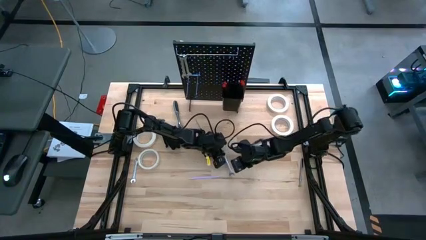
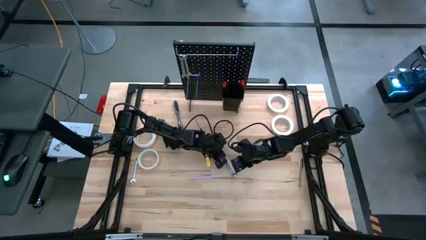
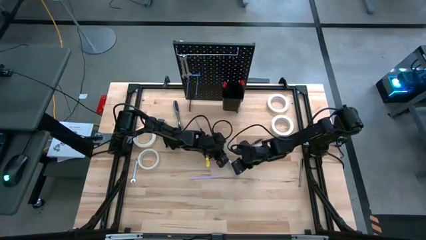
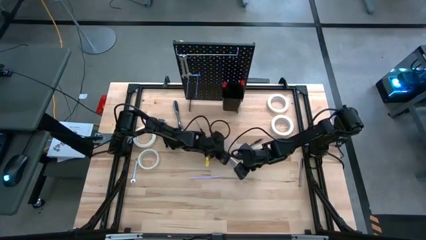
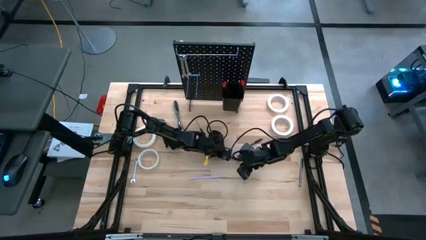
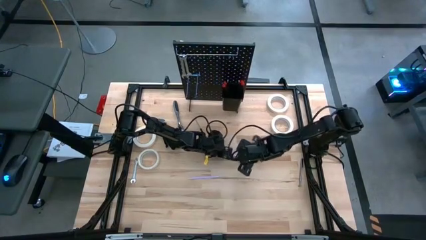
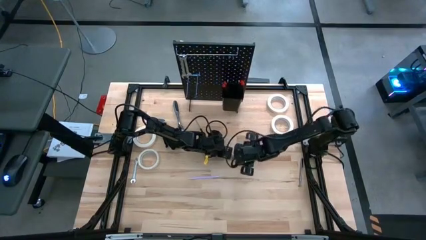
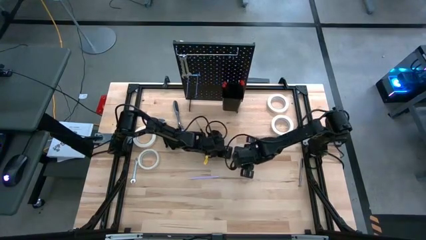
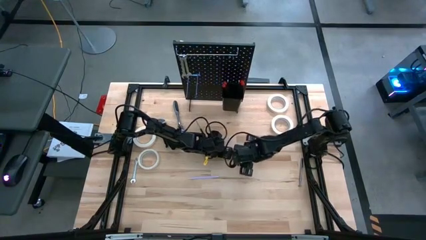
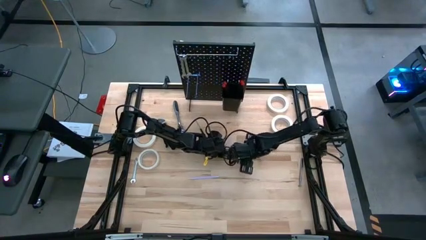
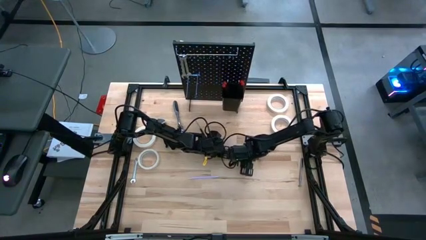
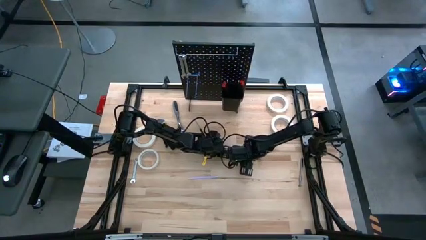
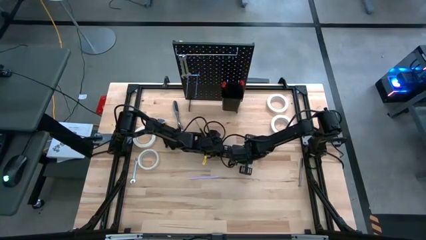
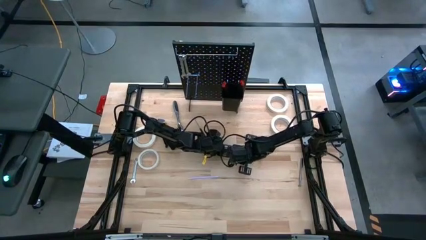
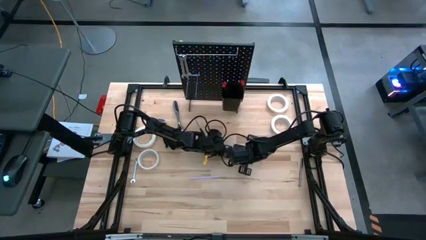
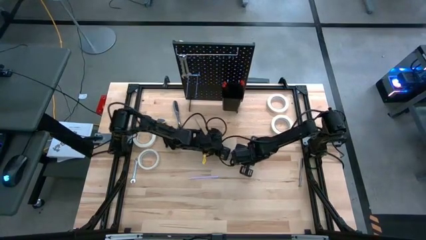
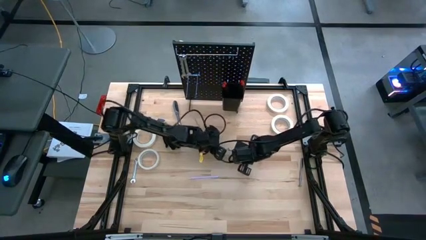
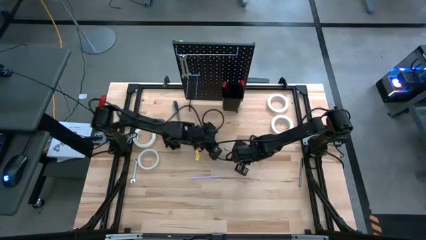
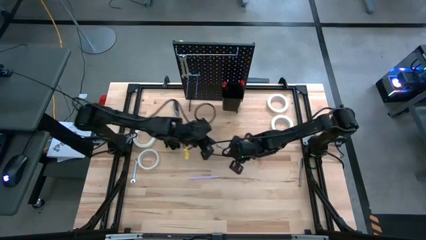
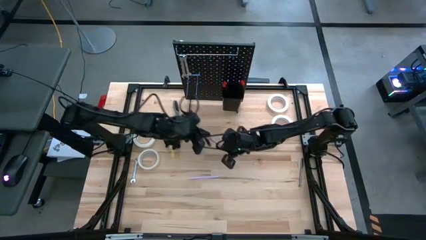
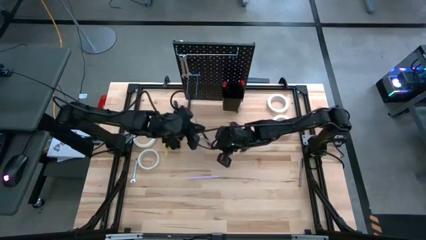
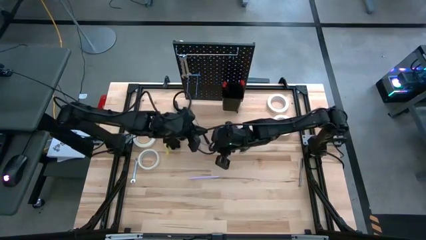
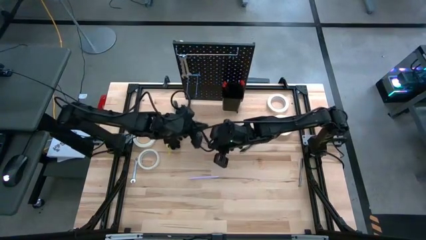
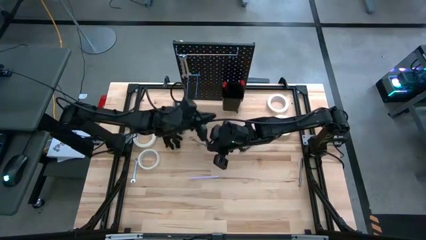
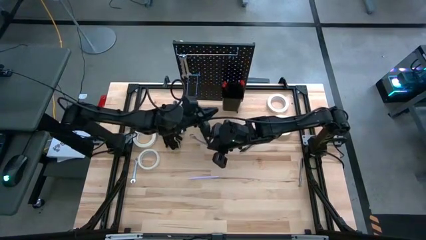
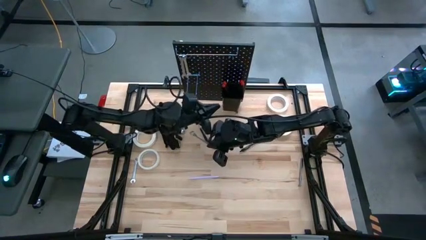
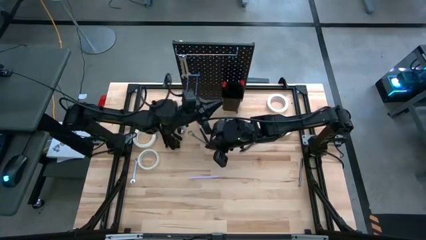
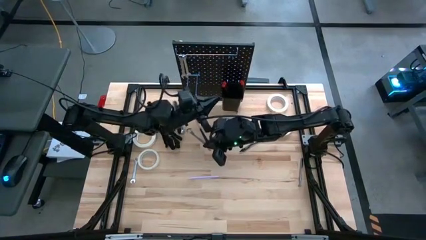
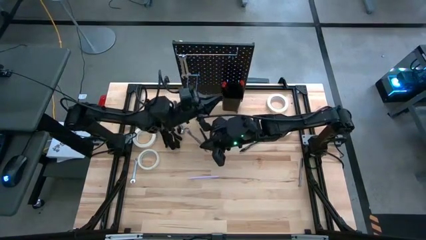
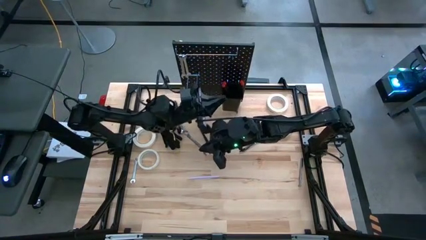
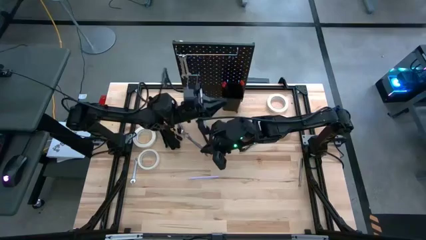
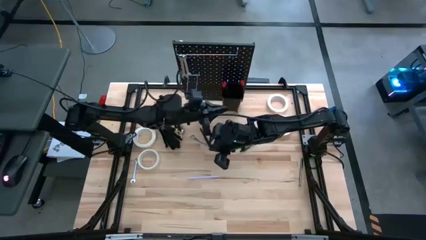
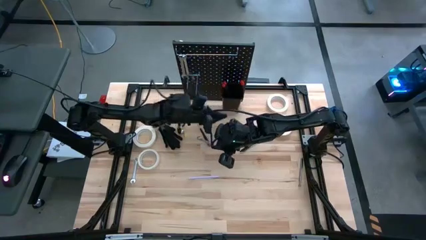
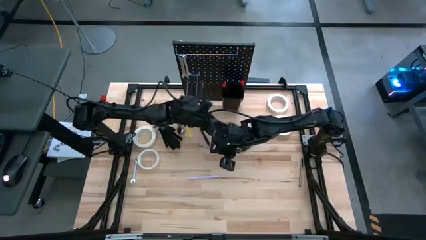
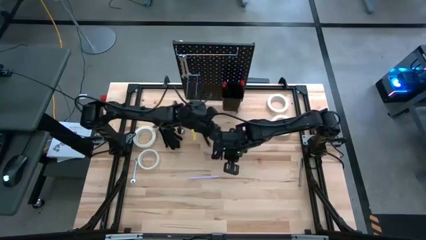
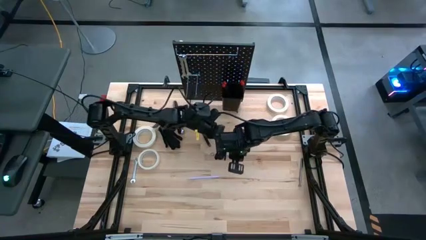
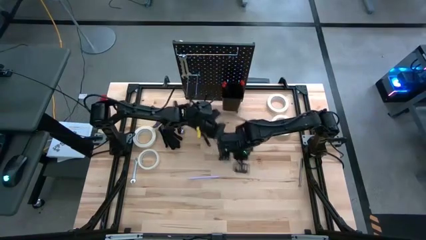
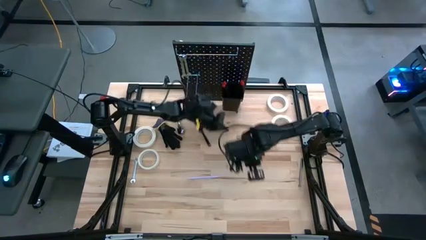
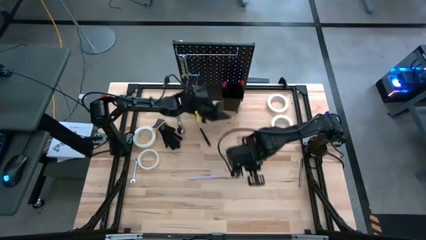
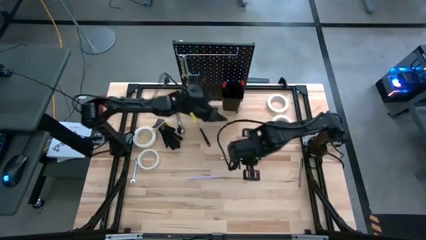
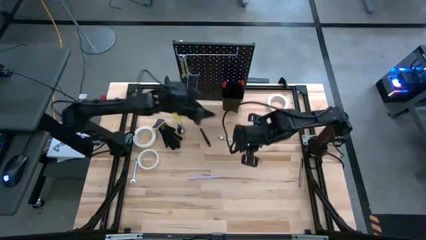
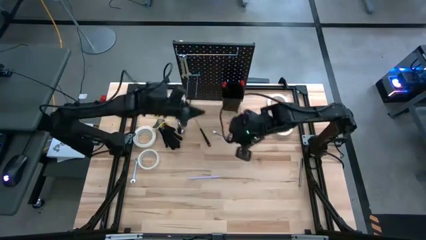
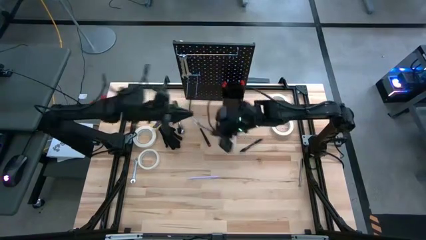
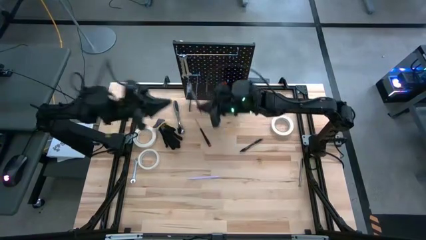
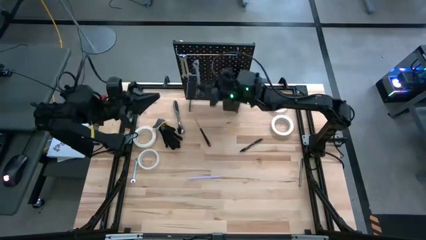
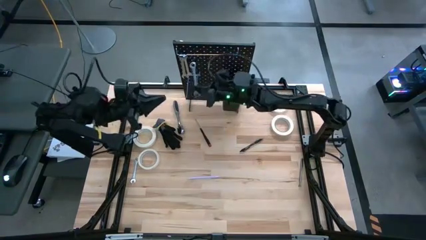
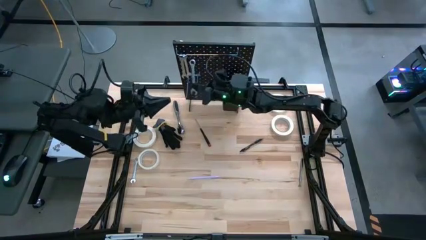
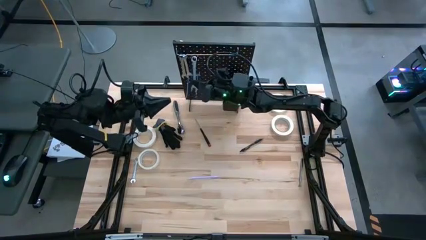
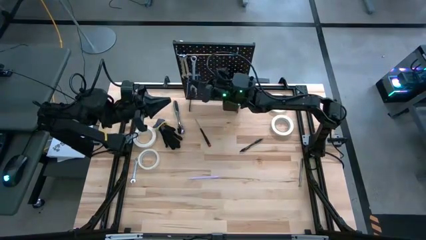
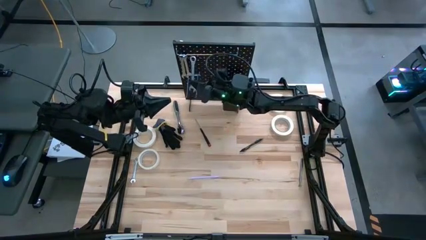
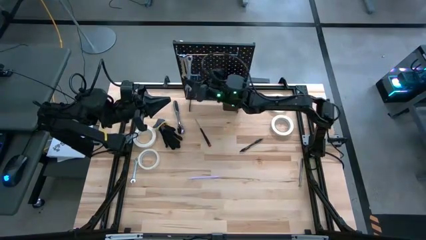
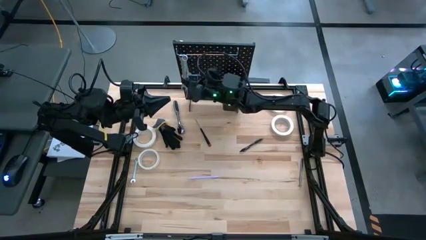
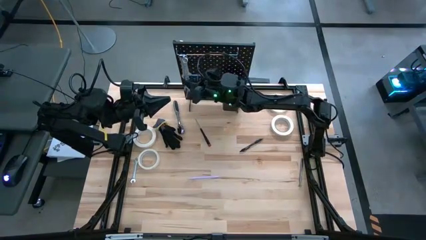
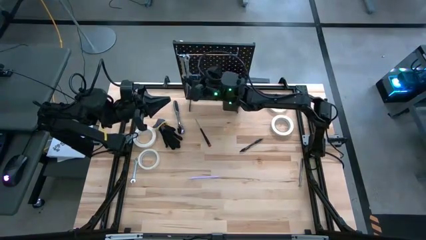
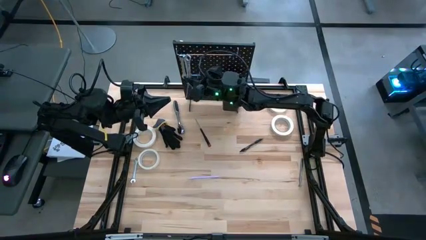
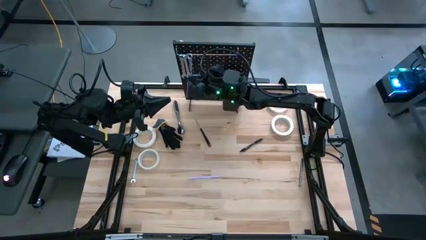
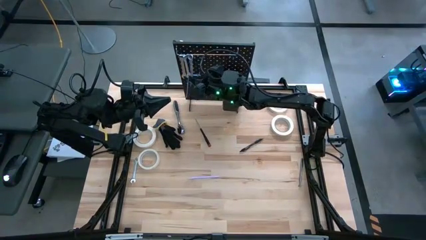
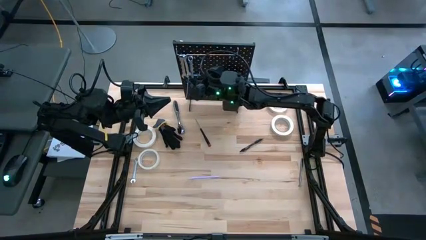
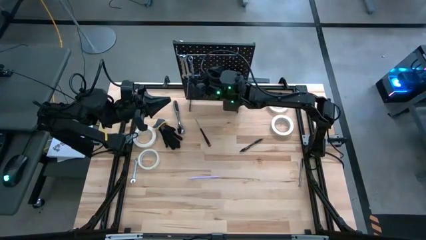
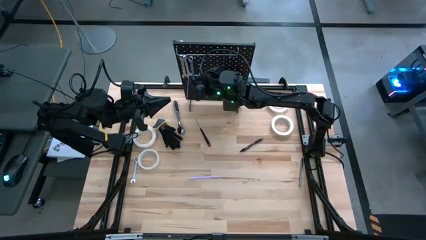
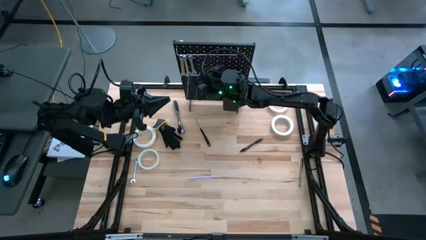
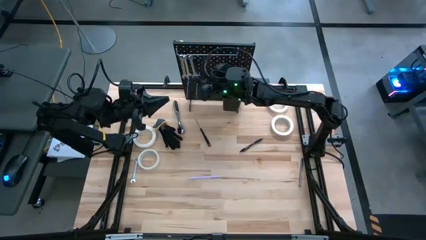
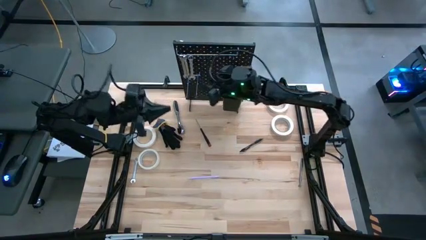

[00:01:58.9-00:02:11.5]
Task: Hang tools onto peg board
Hang the wrench onto the peg board

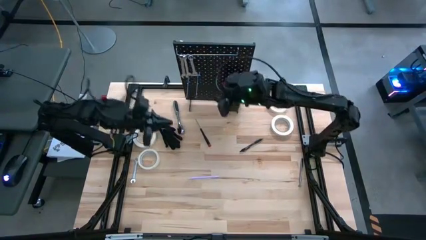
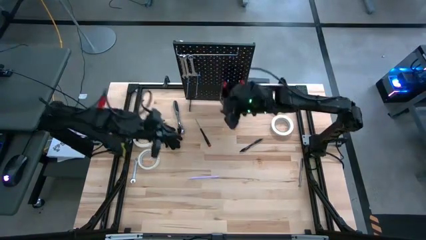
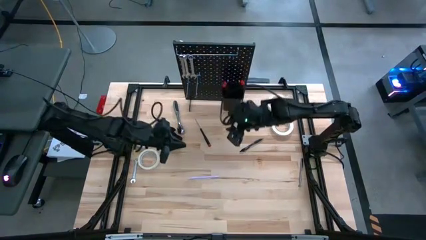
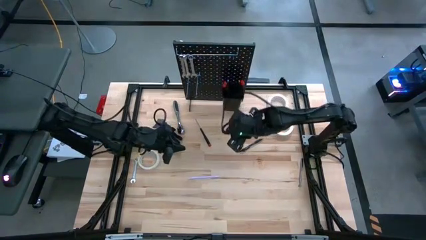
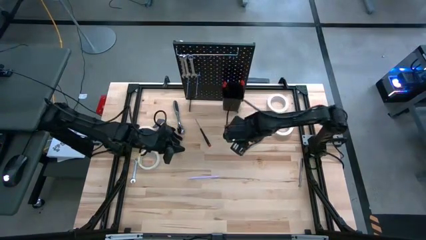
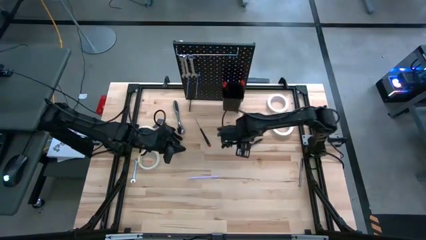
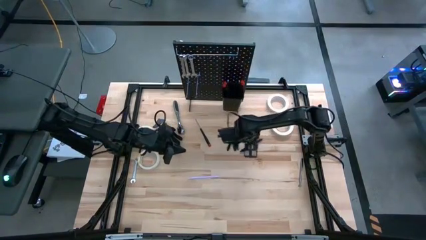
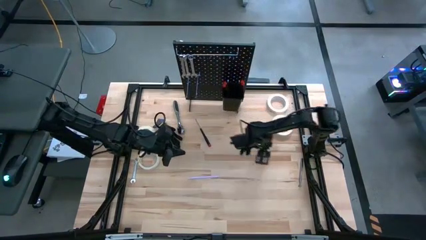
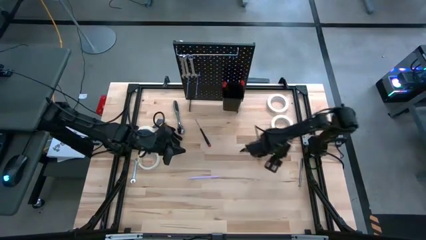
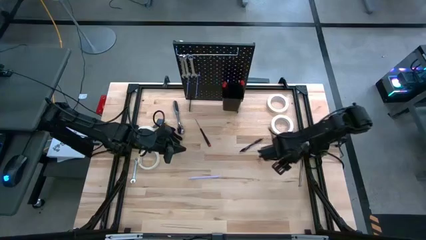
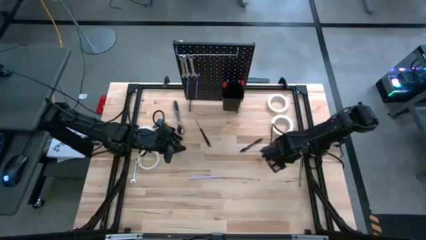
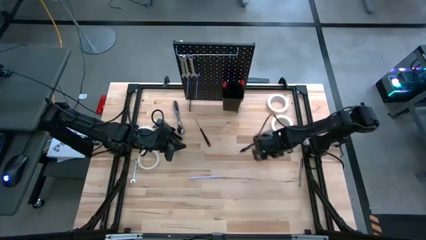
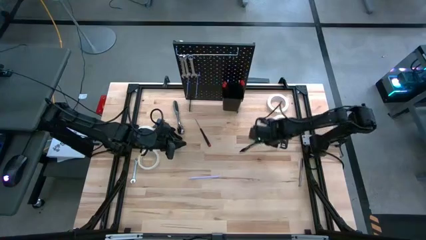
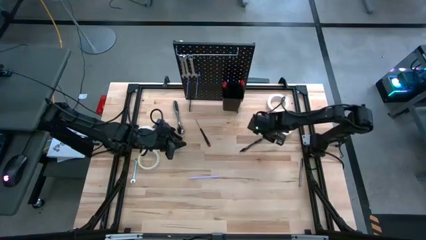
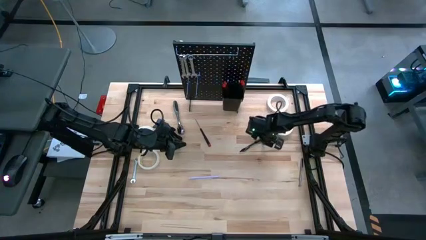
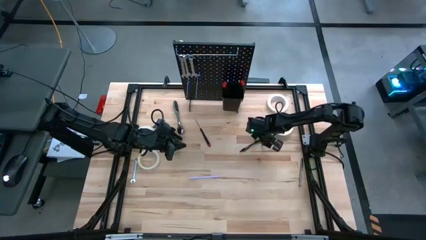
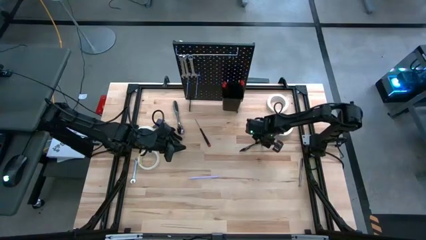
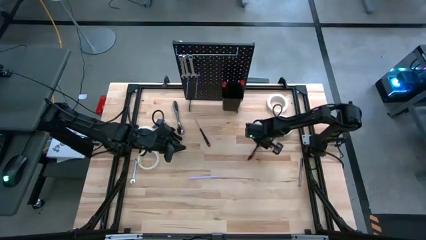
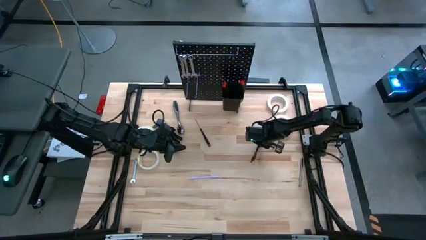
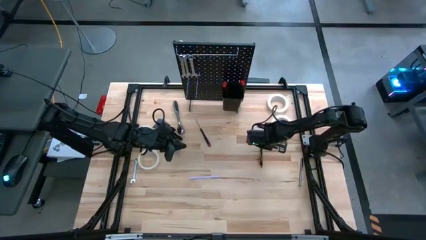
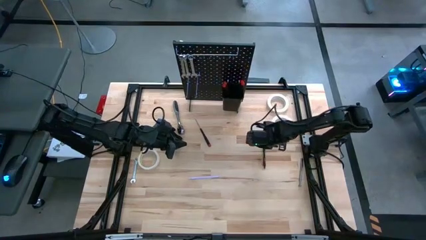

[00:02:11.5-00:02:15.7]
Put the black pen into the black bin on the peg board
